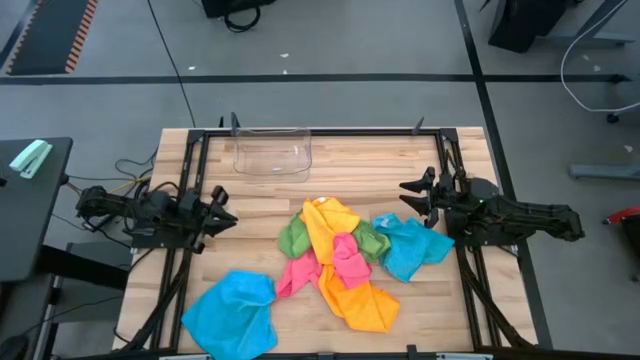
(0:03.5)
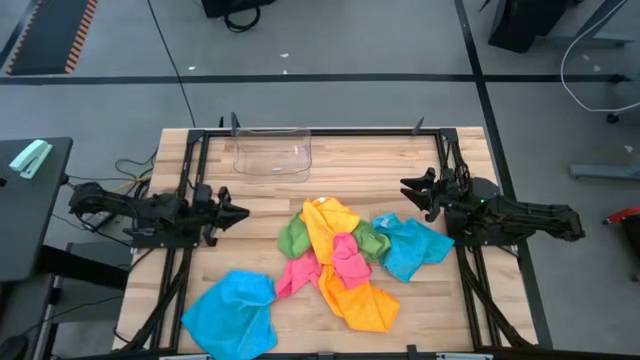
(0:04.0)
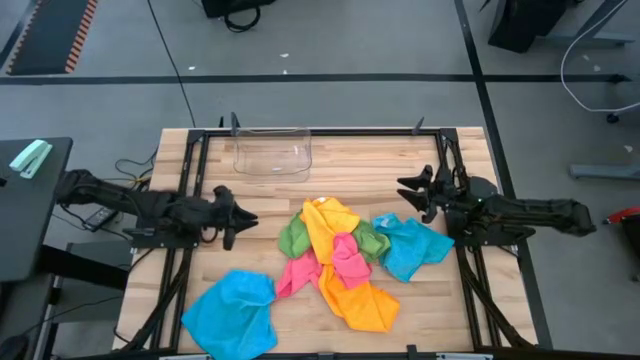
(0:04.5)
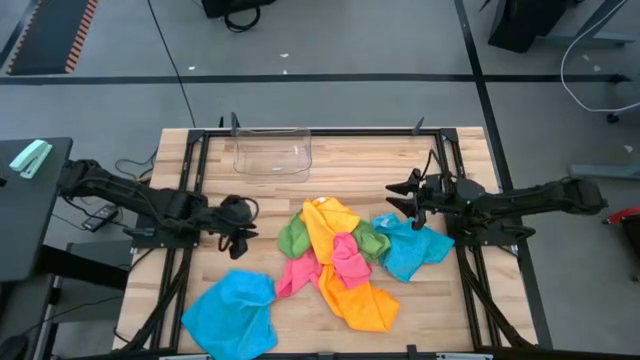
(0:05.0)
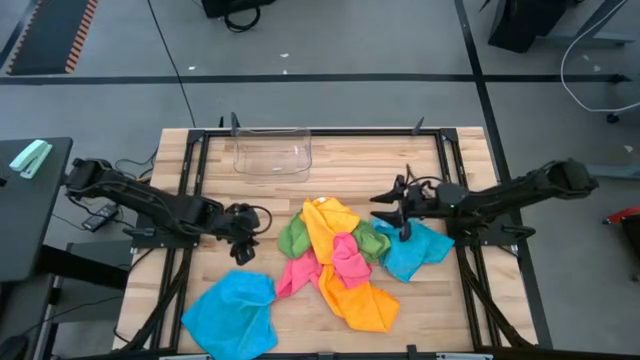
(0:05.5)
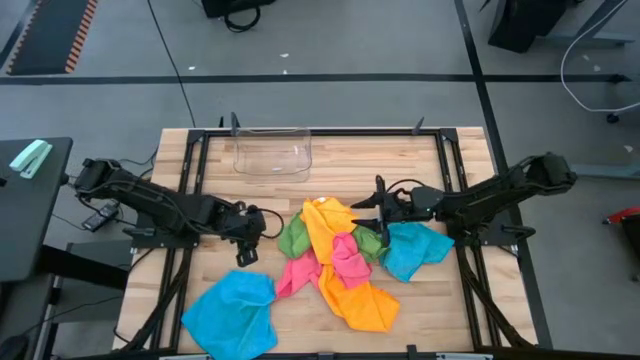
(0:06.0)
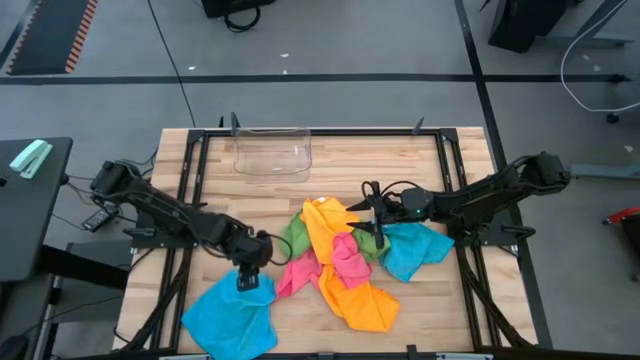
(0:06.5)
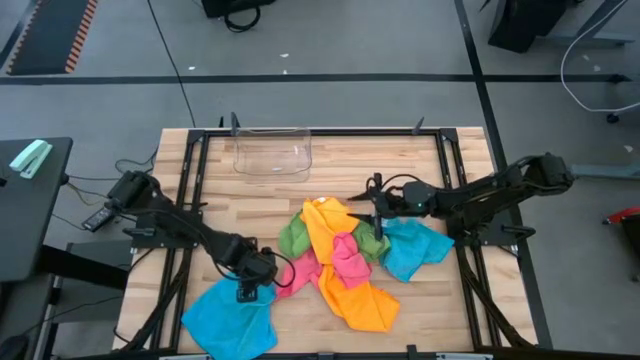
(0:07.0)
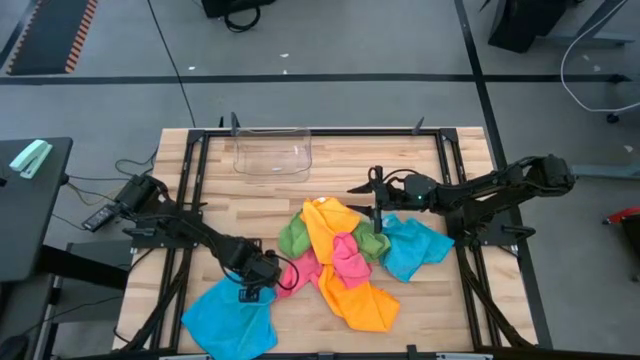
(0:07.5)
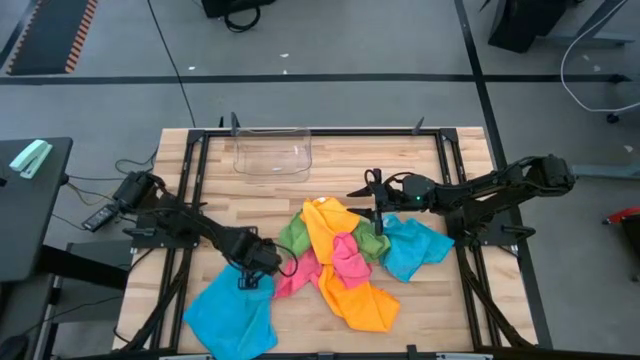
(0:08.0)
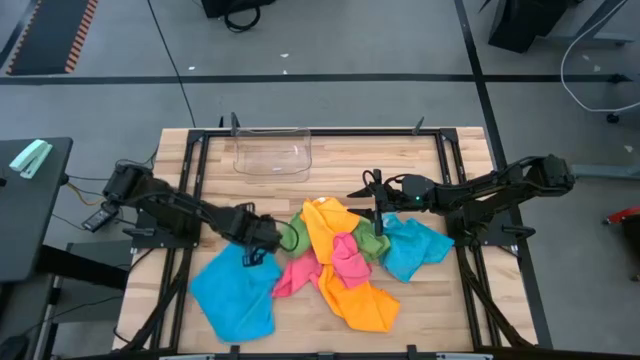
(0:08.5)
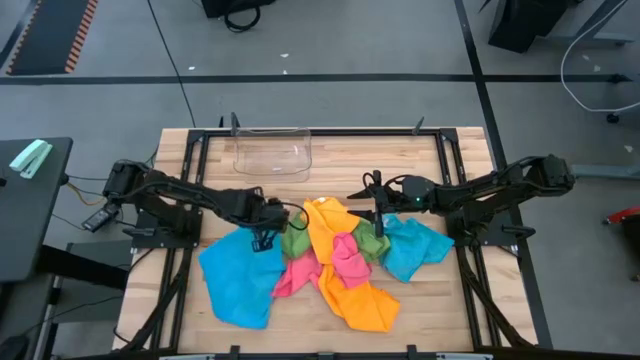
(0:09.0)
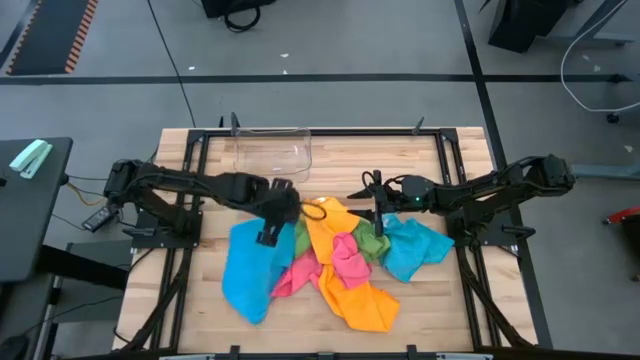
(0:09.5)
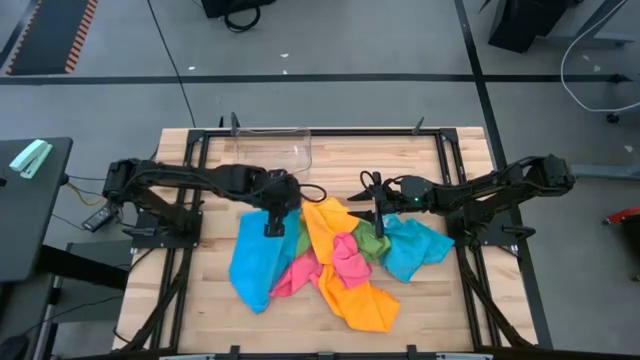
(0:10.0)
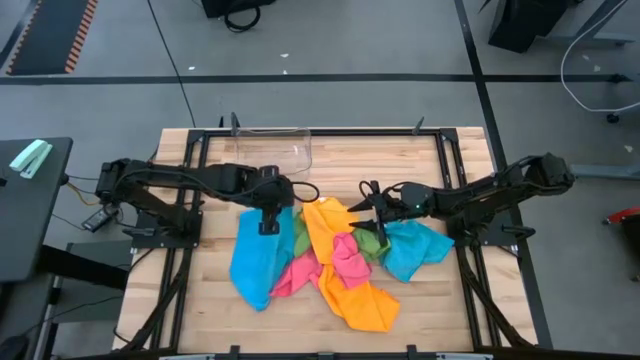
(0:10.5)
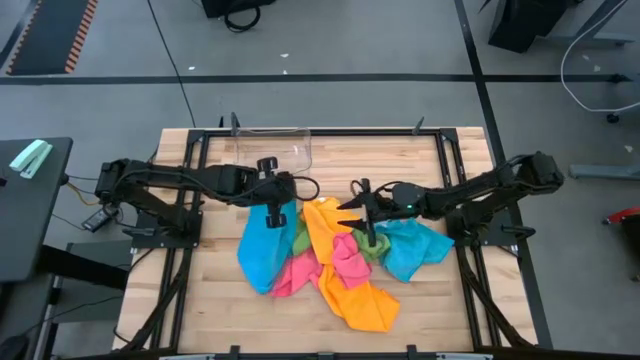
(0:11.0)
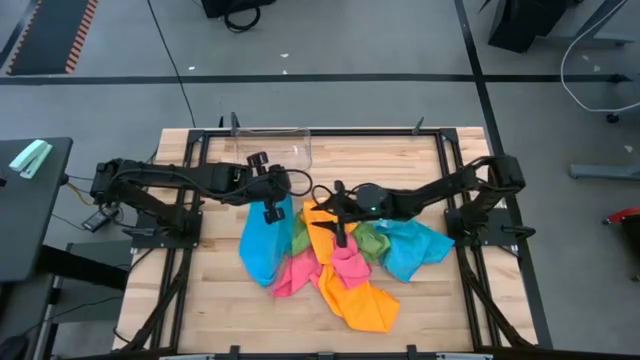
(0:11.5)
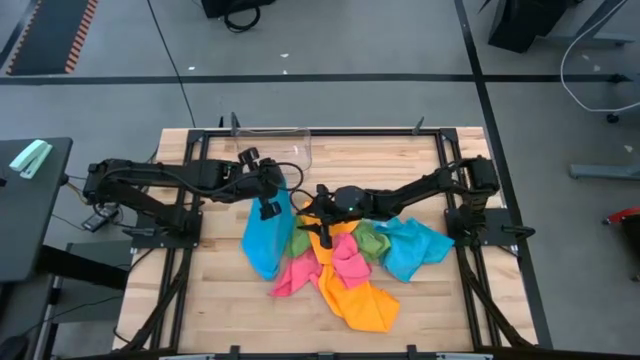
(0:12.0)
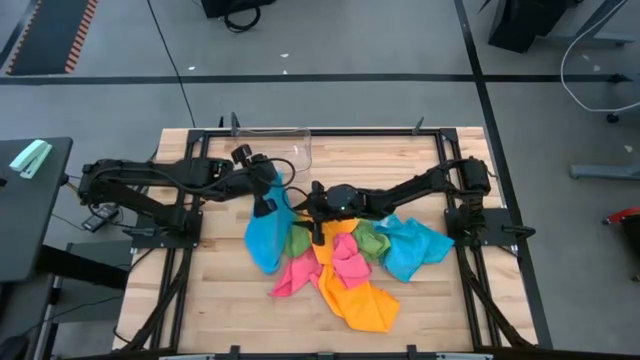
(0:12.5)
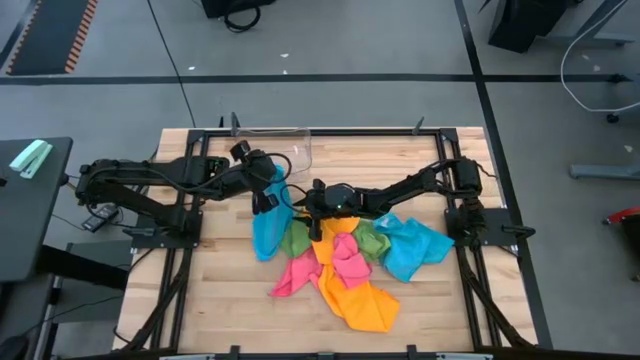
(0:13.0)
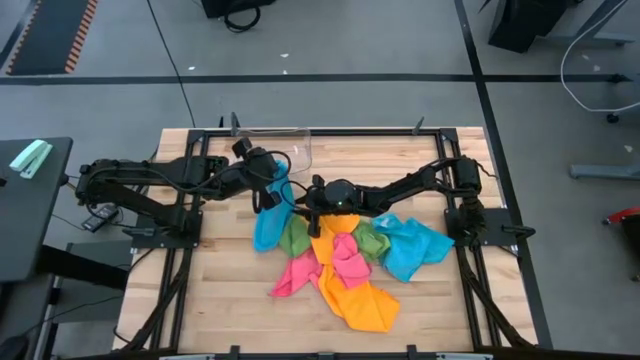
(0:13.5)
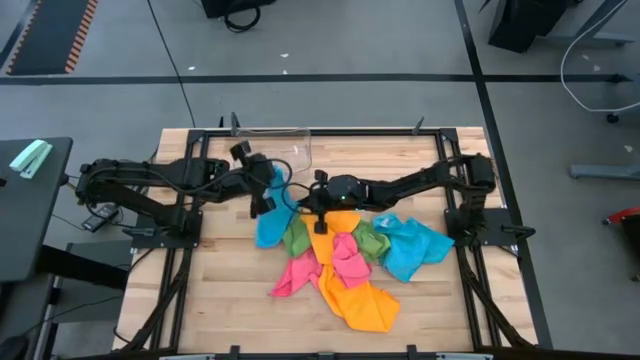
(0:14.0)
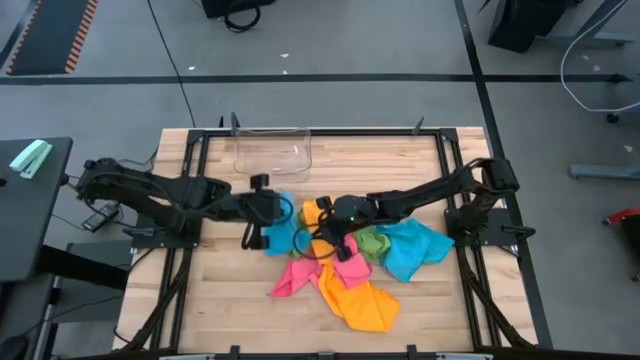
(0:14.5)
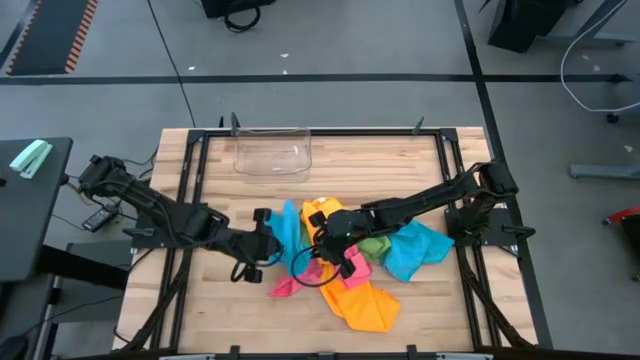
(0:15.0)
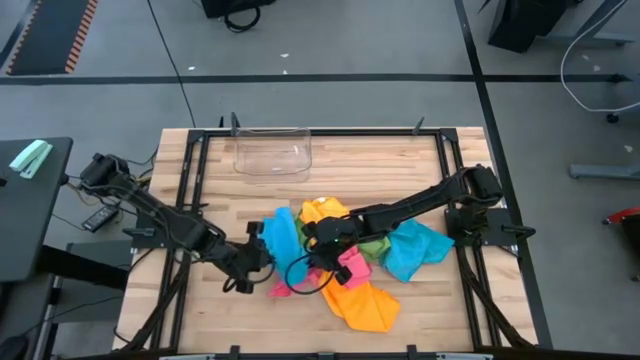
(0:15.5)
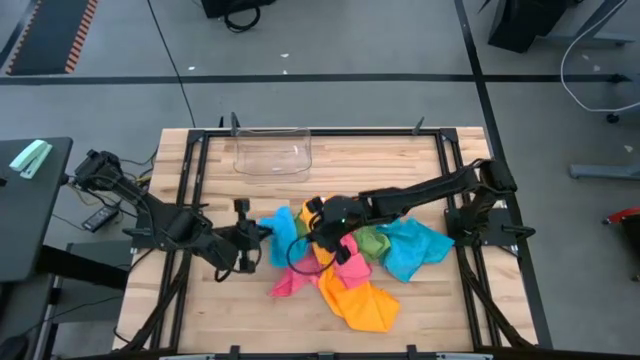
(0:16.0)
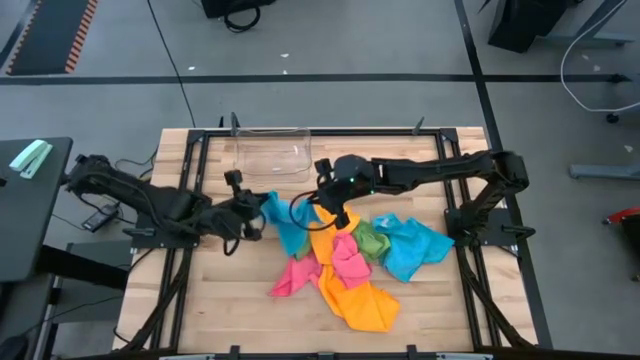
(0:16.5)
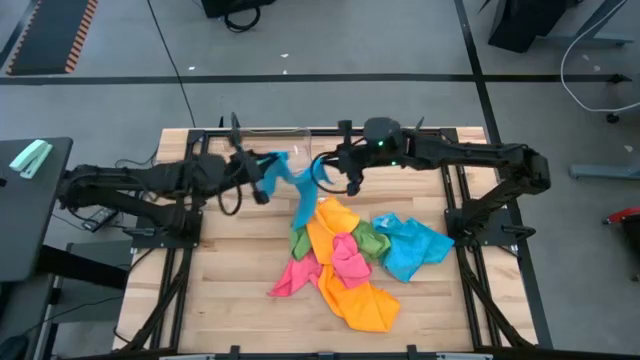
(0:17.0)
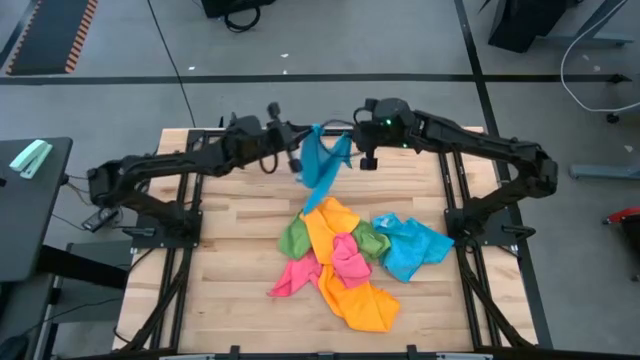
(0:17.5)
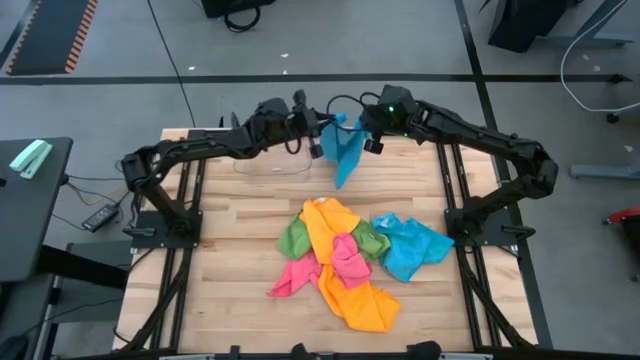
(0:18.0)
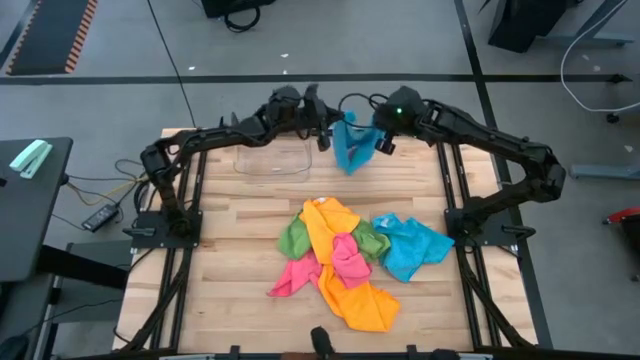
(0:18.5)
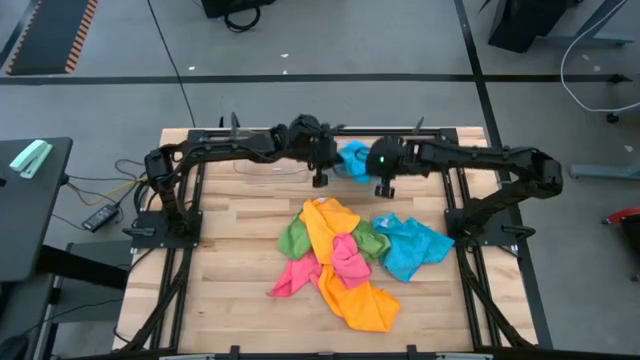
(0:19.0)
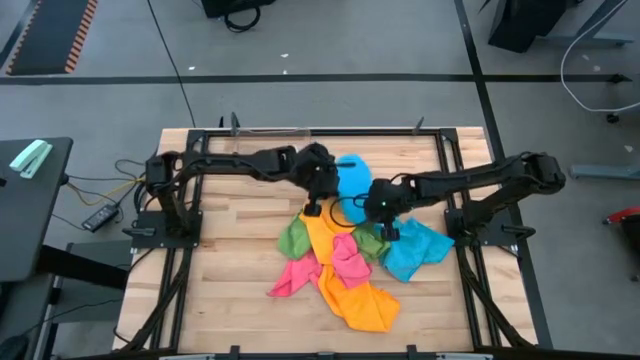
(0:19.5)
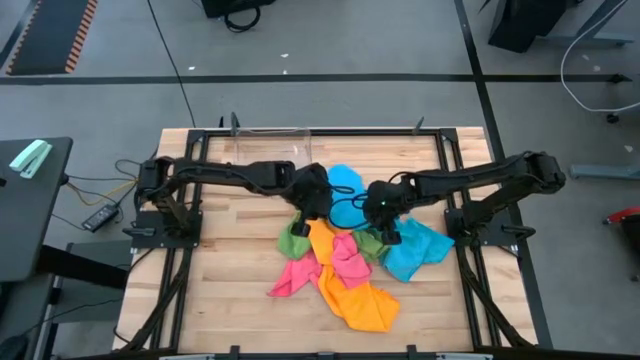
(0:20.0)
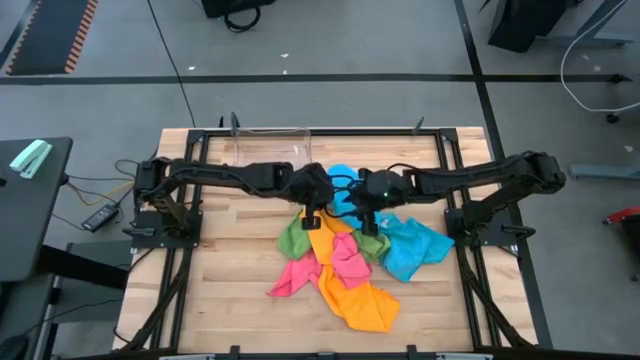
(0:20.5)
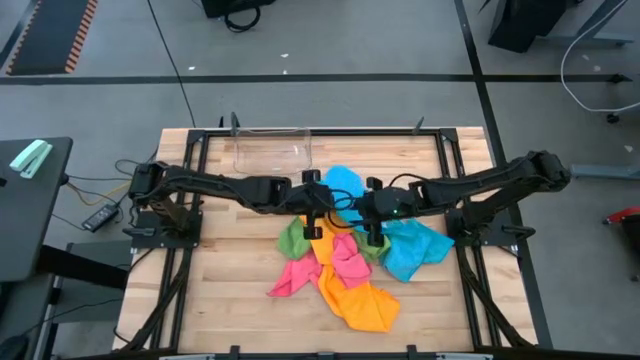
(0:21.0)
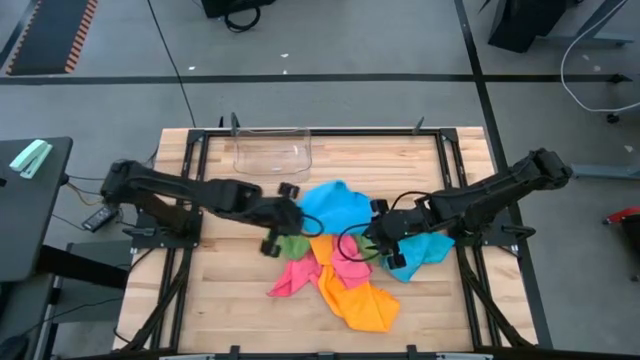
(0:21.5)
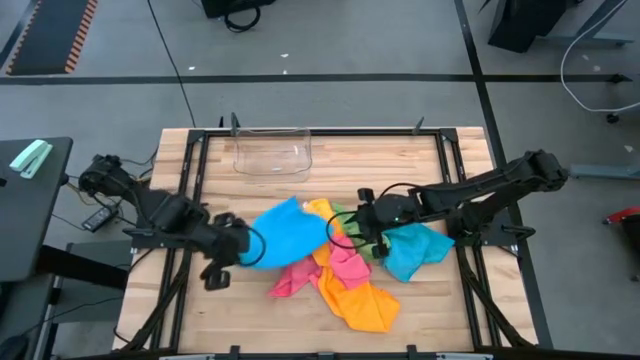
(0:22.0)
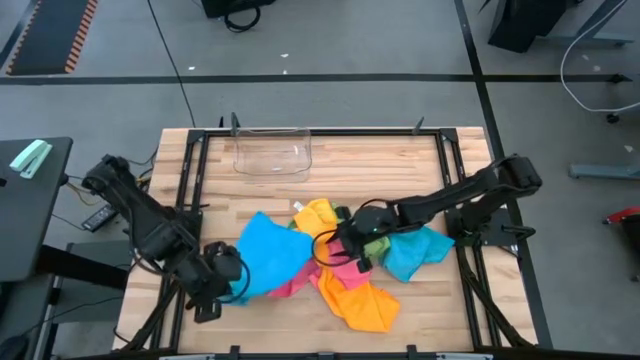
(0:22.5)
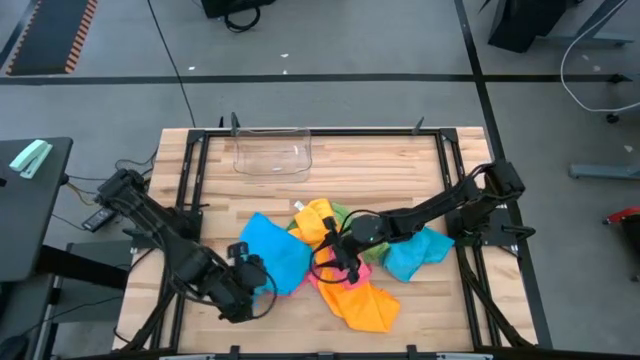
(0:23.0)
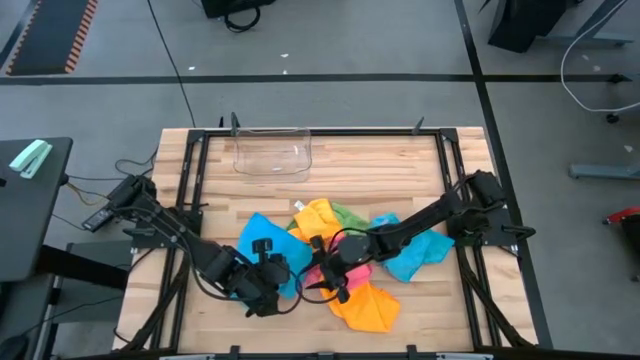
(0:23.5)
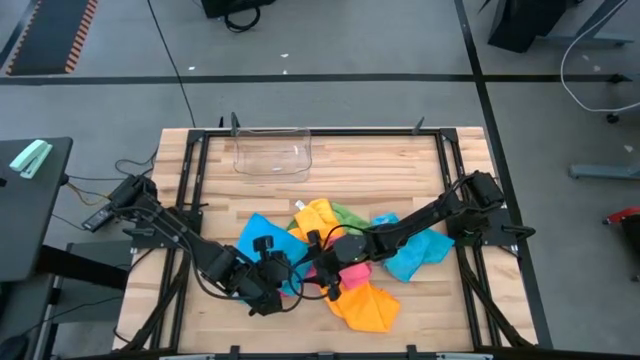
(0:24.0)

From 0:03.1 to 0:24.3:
Task: Fold microfiber towels
Fold the left blue microfiber towel
